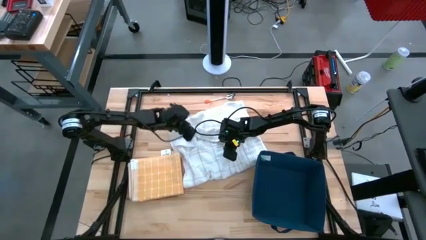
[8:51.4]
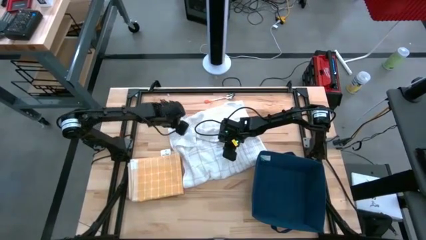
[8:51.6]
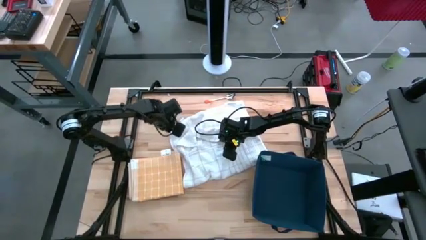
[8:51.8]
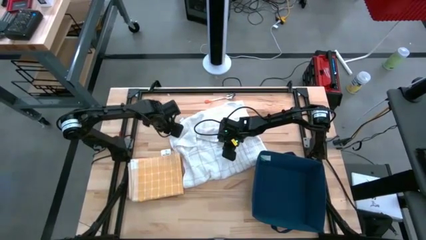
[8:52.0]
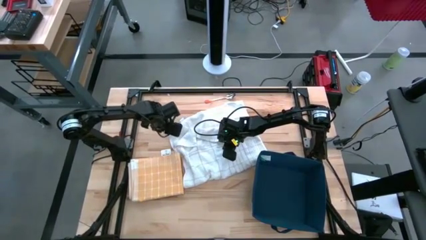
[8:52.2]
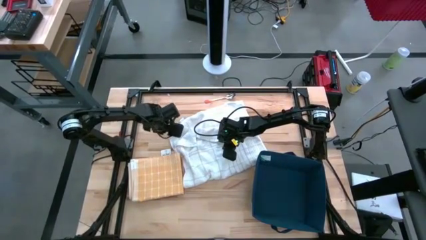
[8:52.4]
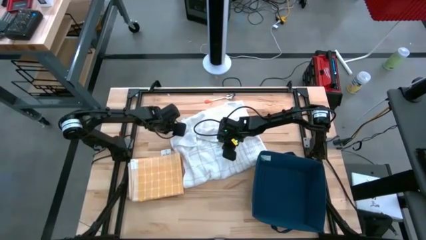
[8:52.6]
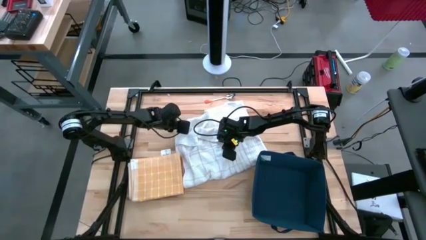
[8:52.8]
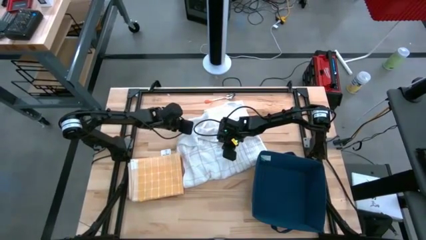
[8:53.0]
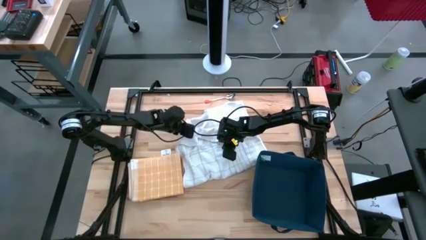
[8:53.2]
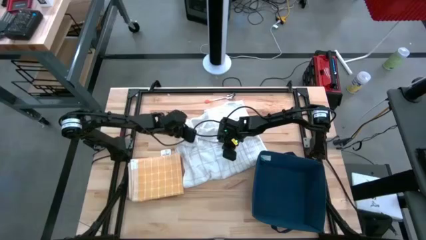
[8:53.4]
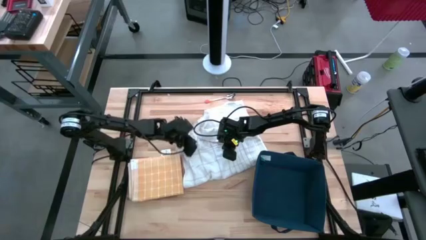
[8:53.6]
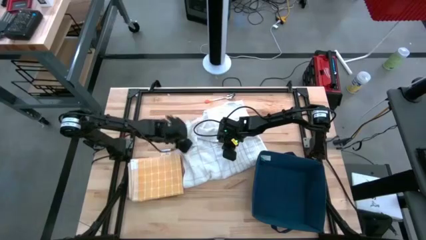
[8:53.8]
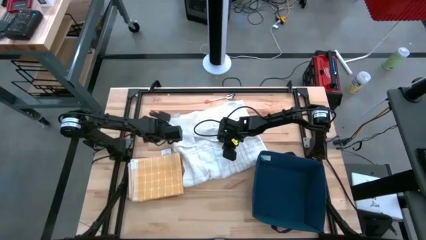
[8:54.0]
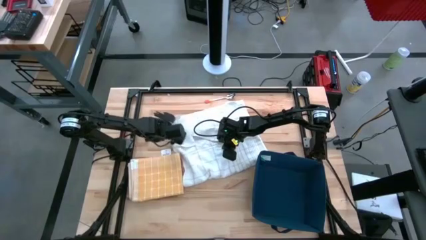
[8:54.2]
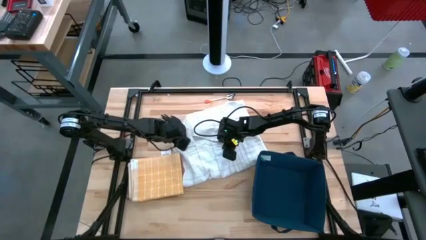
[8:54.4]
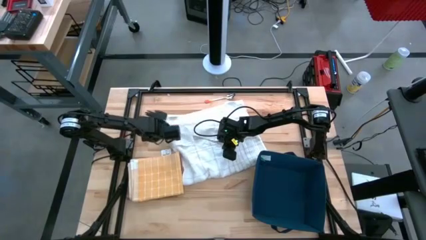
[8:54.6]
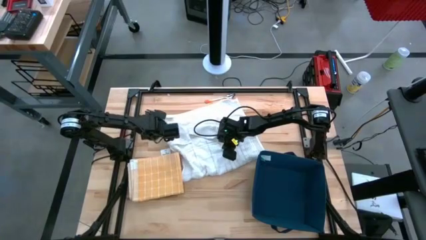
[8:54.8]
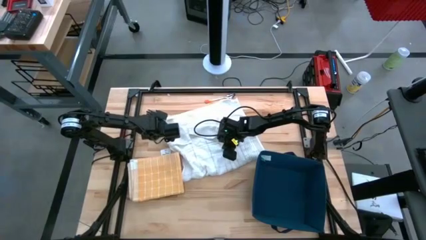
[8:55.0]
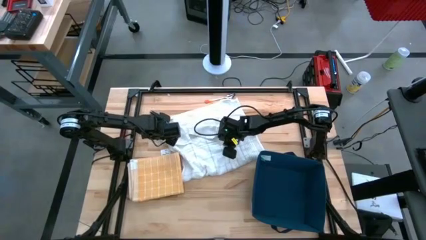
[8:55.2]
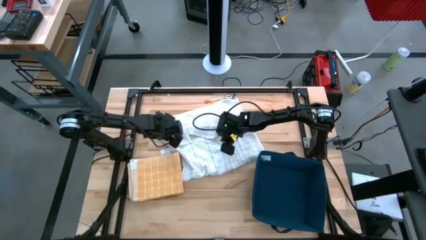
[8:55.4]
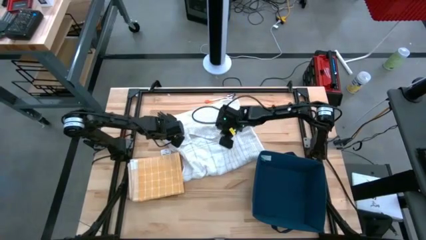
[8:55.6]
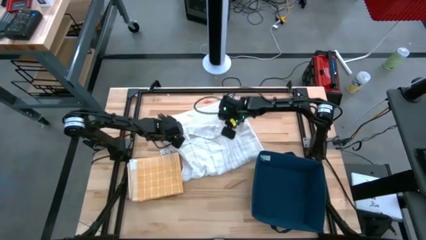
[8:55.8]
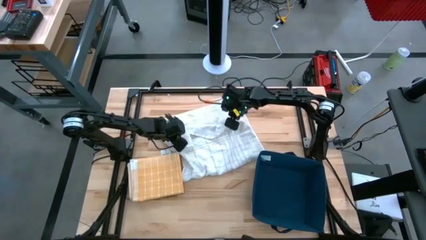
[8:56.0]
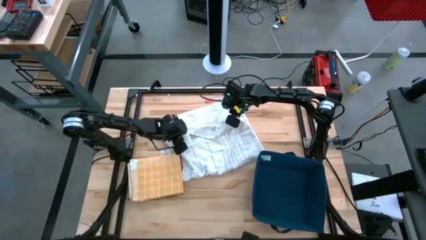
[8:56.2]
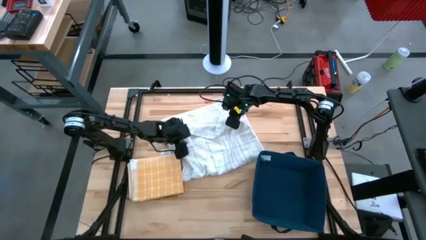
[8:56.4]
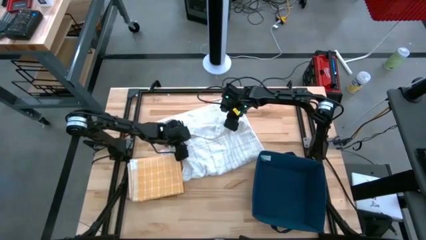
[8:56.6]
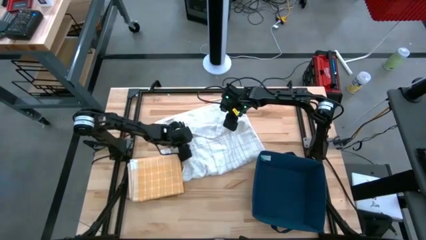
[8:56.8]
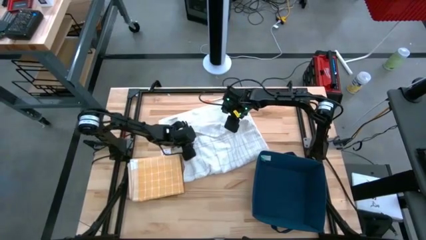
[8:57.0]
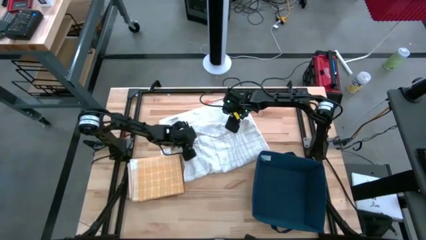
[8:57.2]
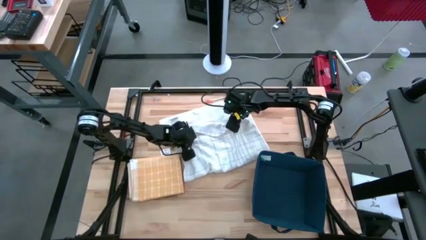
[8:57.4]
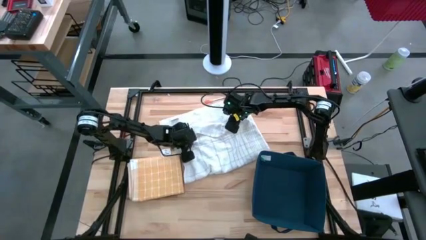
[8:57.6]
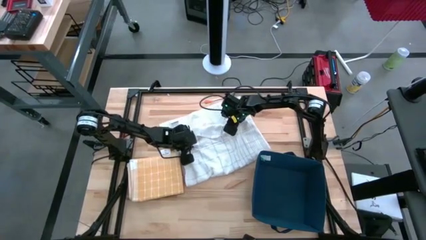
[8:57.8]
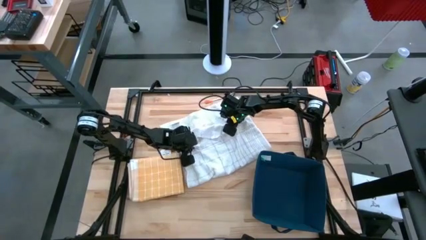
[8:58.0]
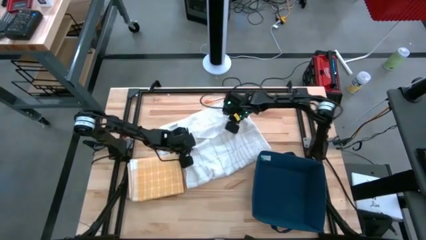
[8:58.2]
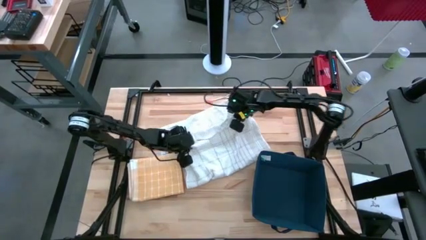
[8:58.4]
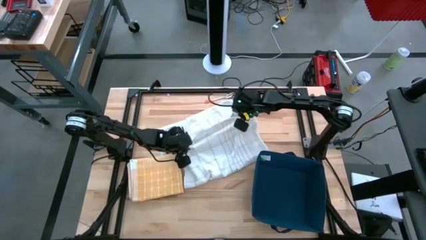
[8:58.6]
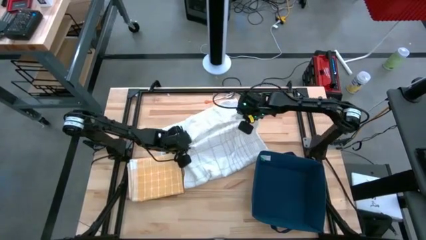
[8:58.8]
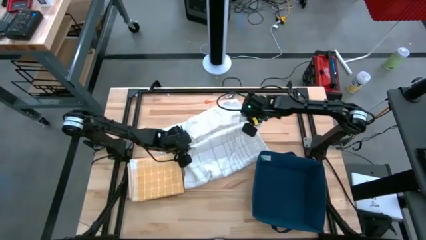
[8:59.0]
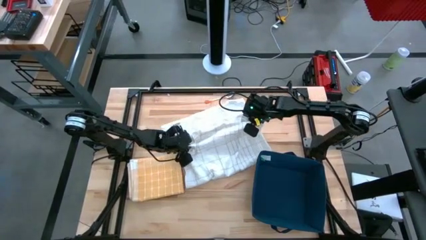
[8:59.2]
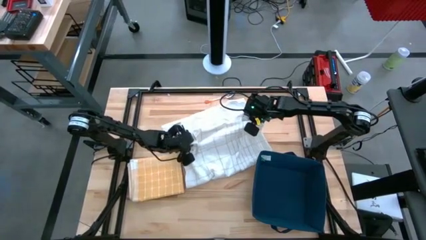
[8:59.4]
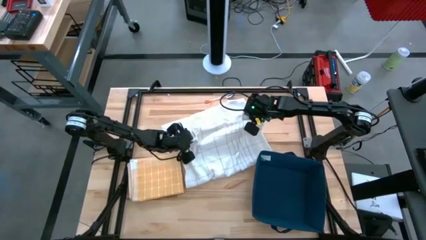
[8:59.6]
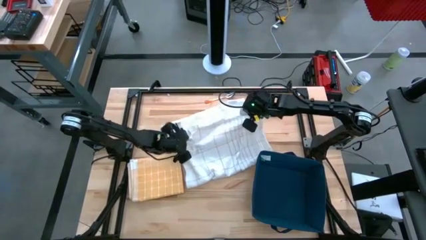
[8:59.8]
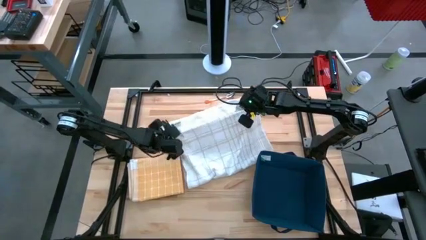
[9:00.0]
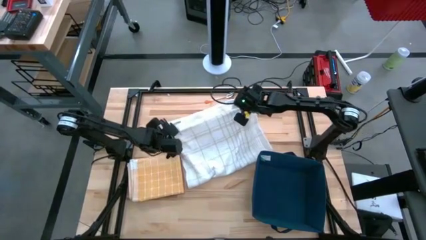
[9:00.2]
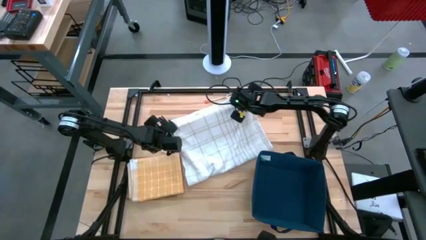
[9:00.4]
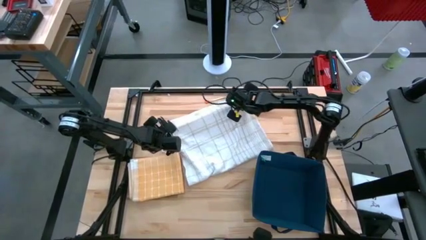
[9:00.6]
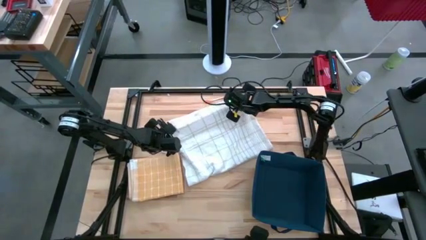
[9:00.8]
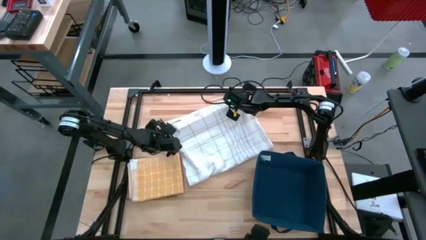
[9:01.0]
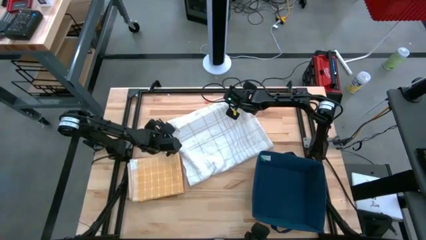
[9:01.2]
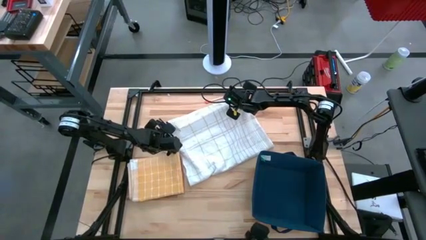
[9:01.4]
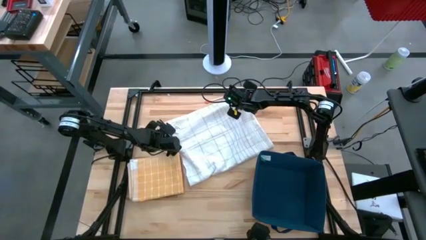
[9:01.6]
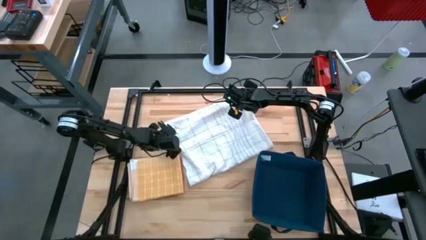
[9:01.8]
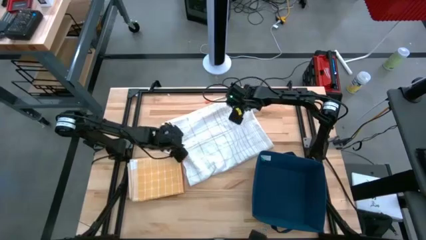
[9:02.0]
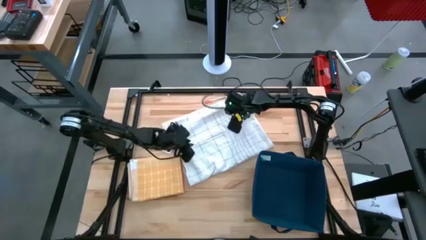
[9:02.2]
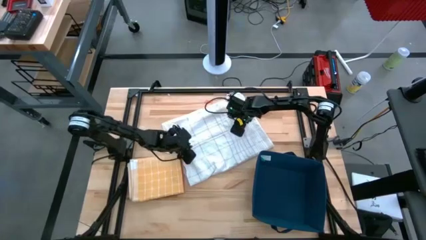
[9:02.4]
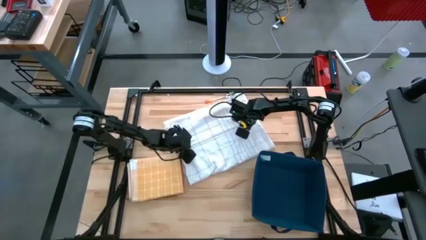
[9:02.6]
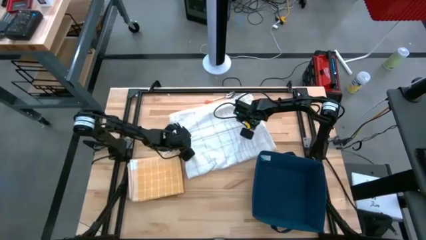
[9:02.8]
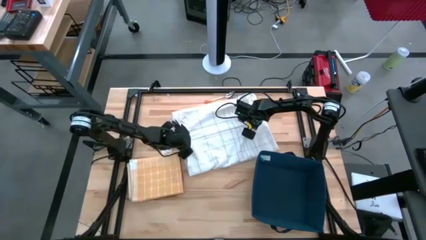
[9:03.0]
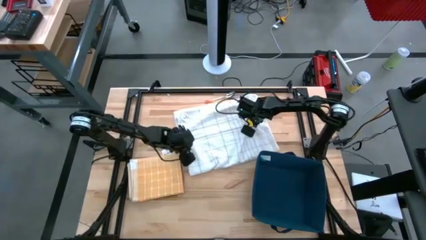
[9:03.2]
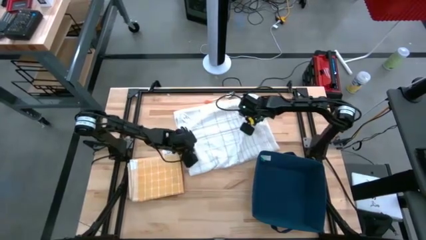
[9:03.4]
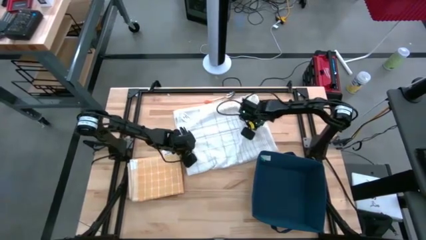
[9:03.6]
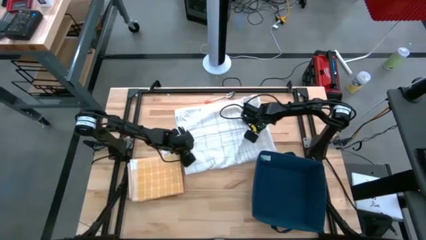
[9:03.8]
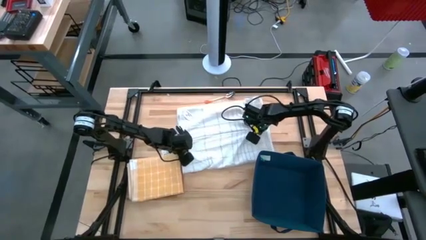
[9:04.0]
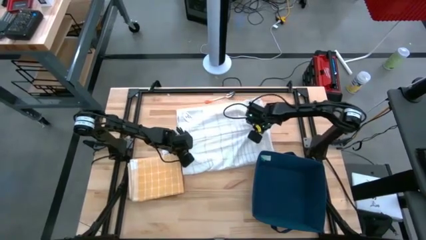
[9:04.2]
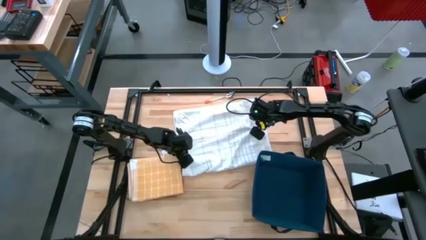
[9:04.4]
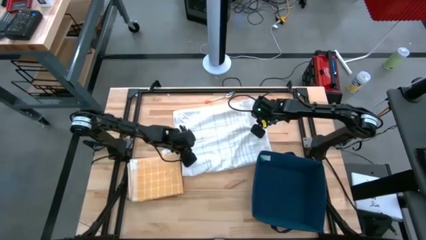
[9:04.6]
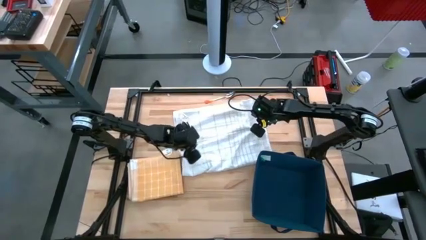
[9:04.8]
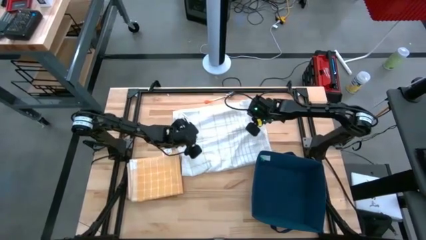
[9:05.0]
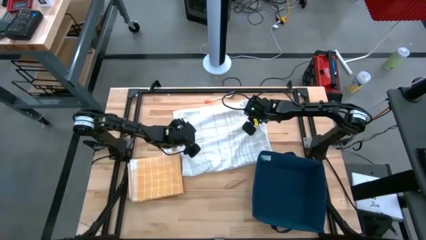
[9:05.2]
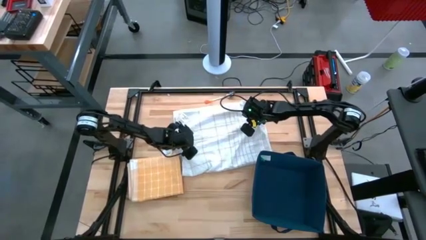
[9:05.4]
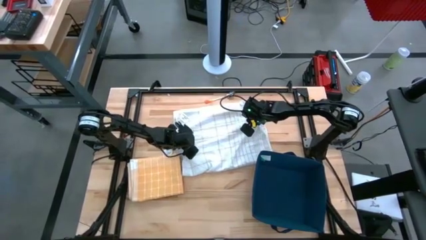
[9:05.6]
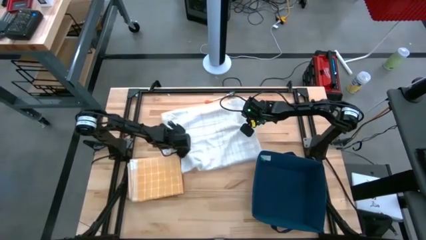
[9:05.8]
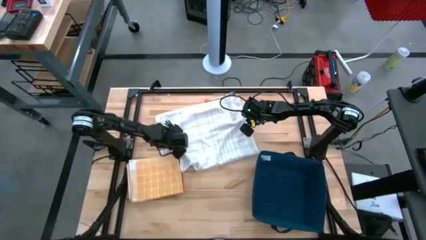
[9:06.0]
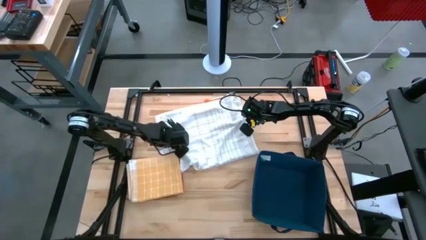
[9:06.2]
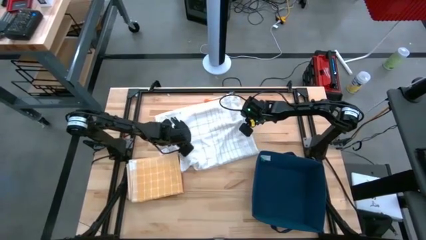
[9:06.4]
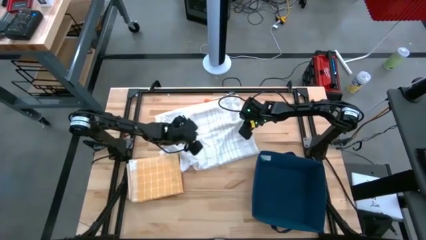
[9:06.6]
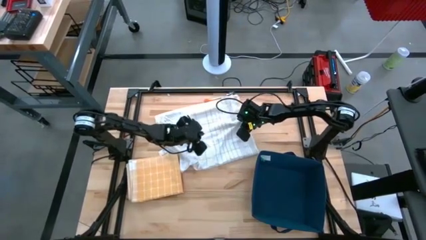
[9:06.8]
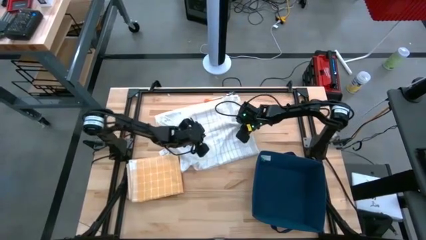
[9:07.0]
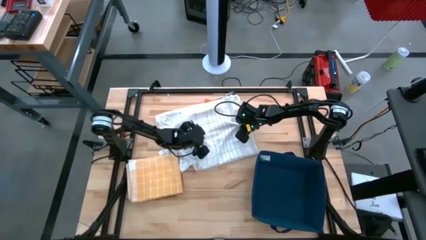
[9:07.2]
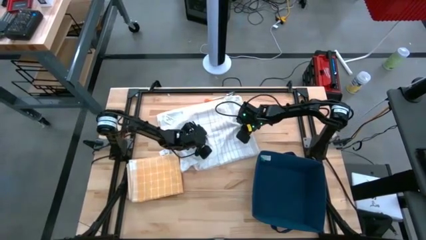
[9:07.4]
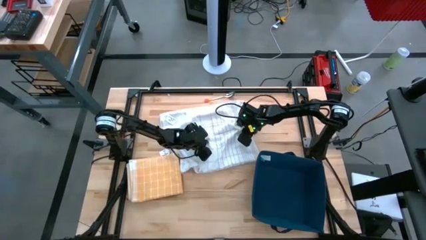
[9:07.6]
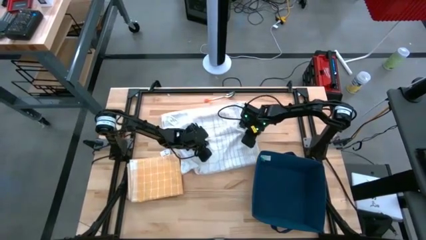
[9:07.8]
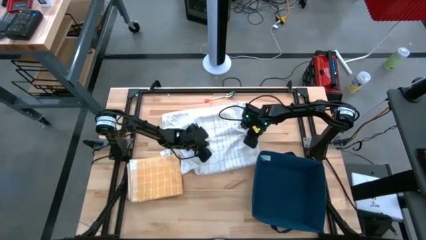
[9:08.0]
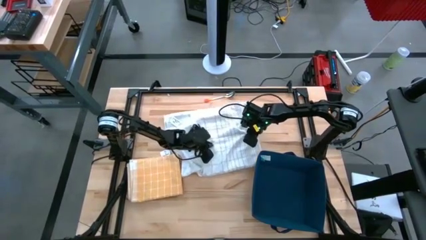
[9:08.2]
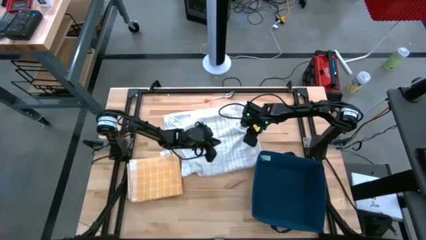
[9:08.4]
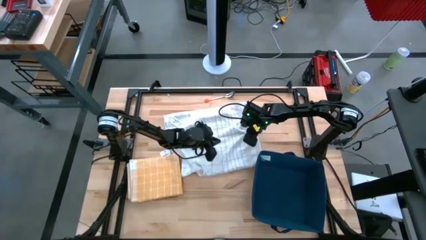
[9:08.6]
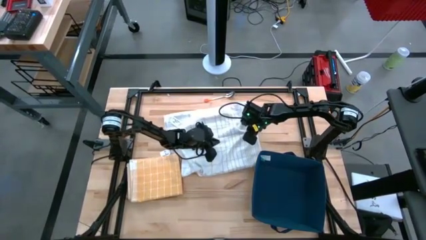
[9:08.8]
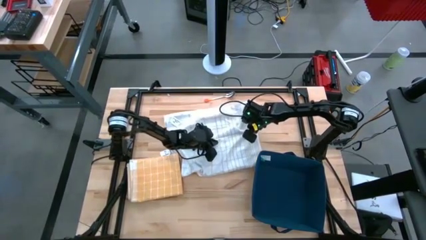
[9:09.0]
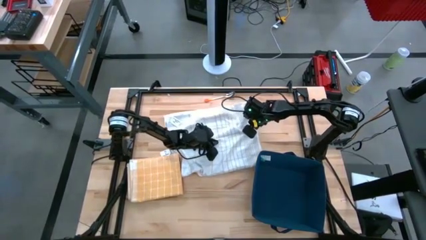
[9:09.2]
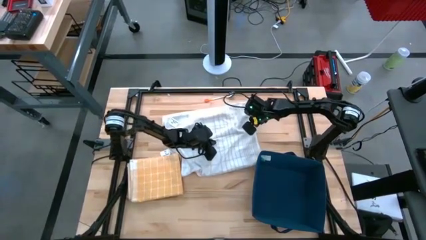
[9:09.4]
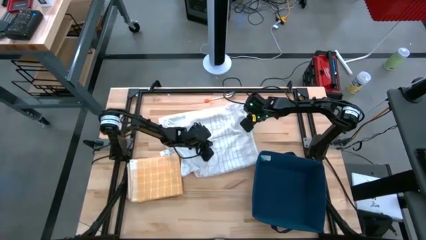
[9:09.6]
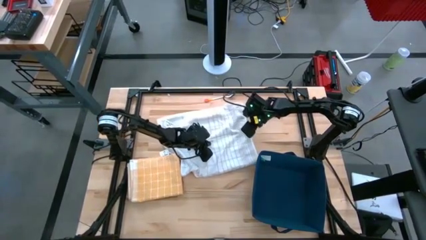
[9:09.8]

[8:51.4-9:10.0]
Task: Fold towel
Fold the white towel
